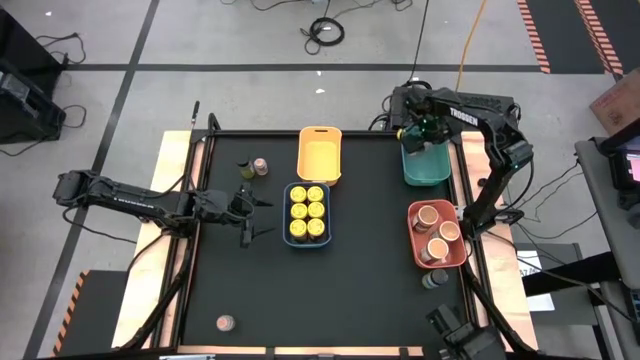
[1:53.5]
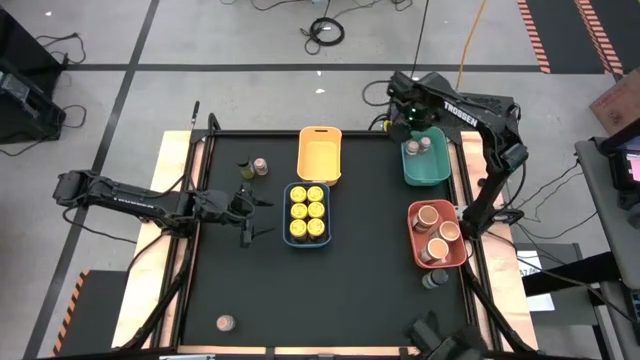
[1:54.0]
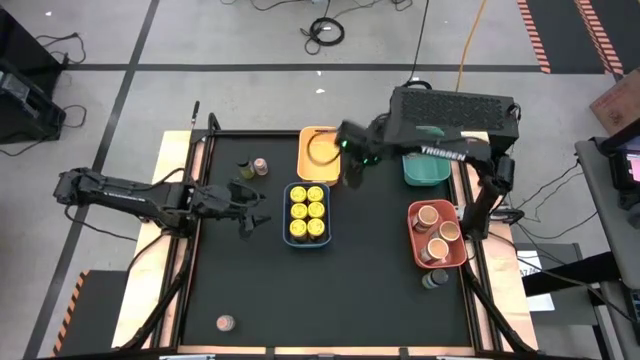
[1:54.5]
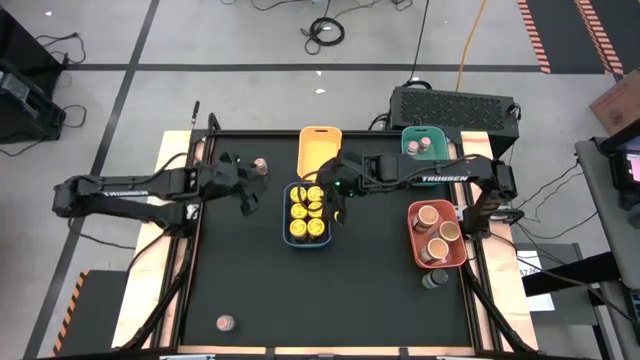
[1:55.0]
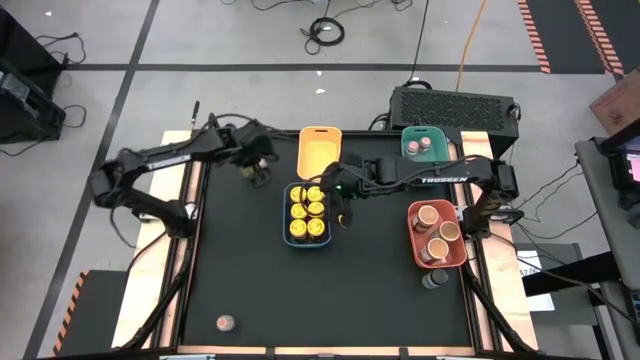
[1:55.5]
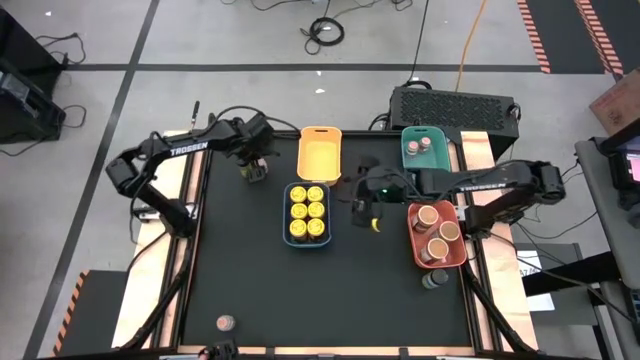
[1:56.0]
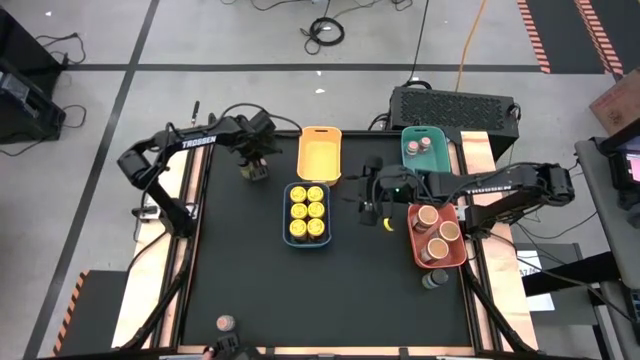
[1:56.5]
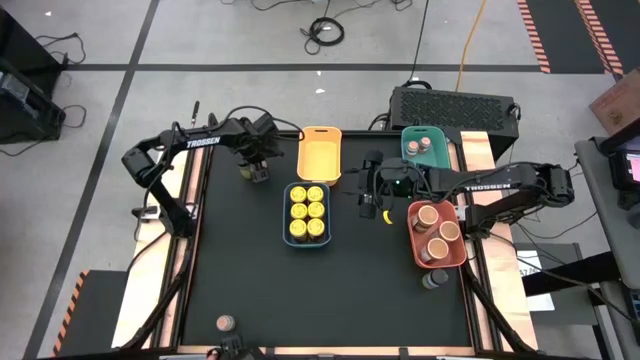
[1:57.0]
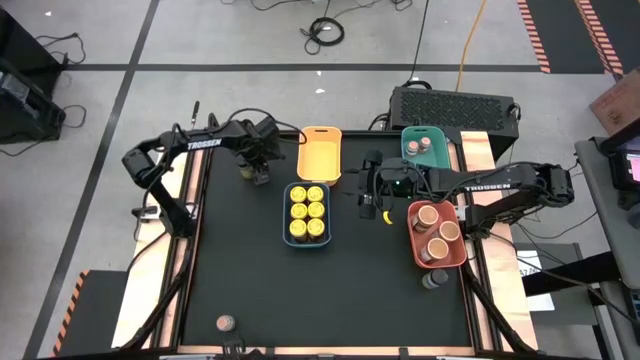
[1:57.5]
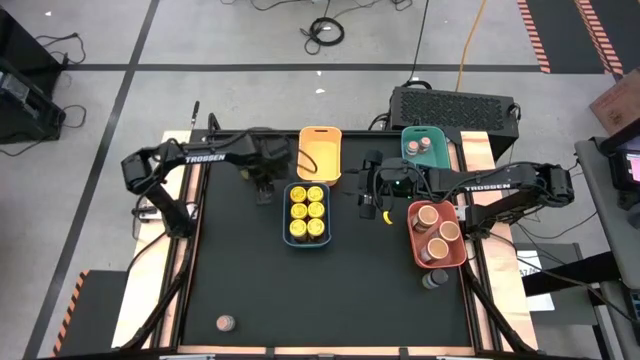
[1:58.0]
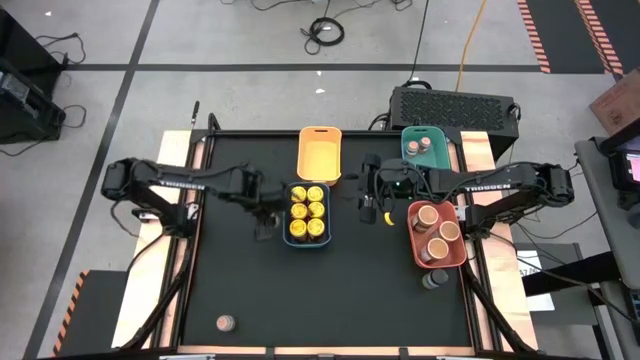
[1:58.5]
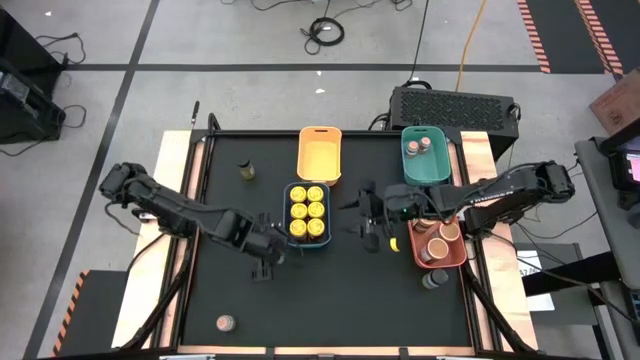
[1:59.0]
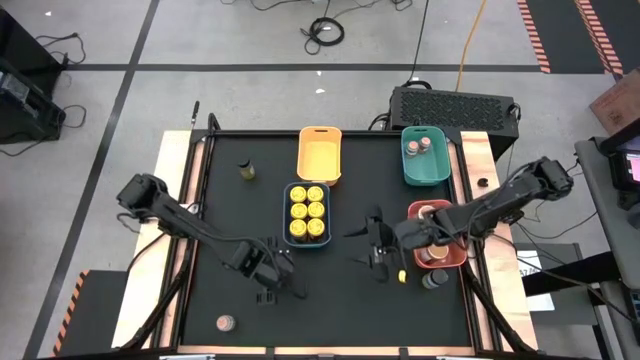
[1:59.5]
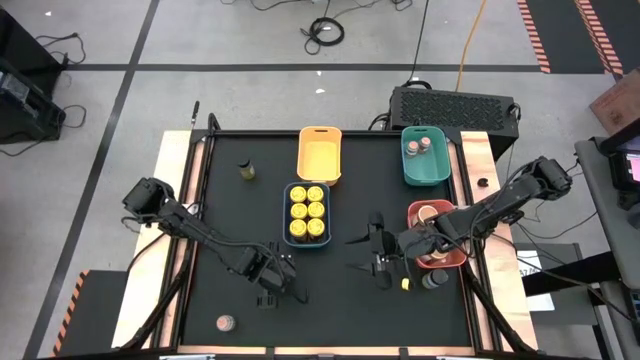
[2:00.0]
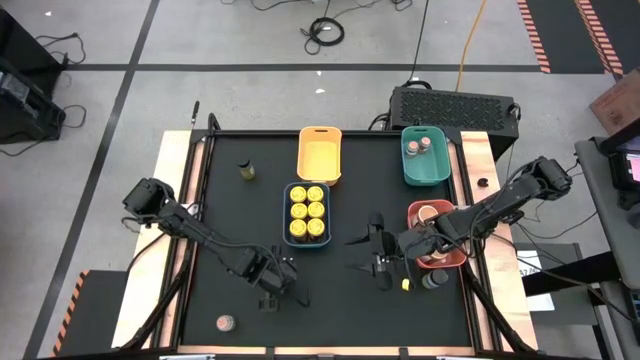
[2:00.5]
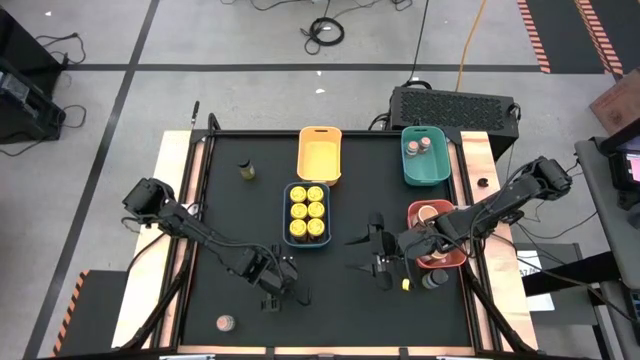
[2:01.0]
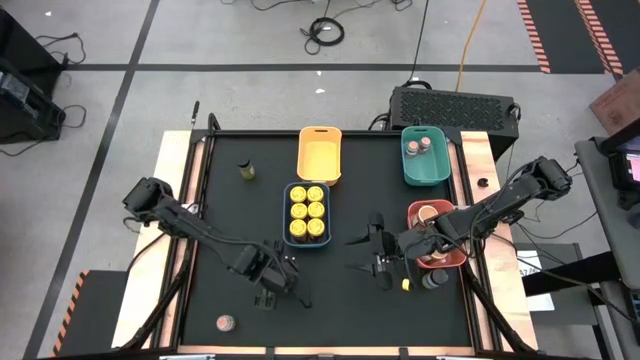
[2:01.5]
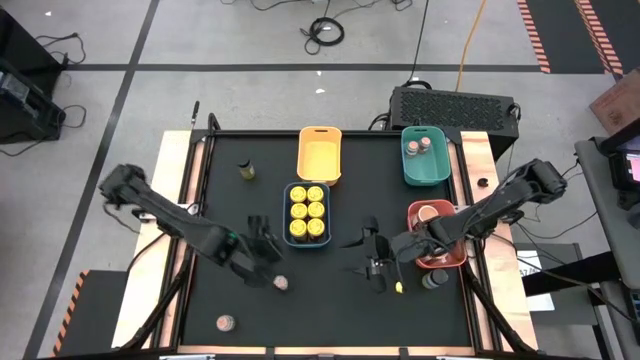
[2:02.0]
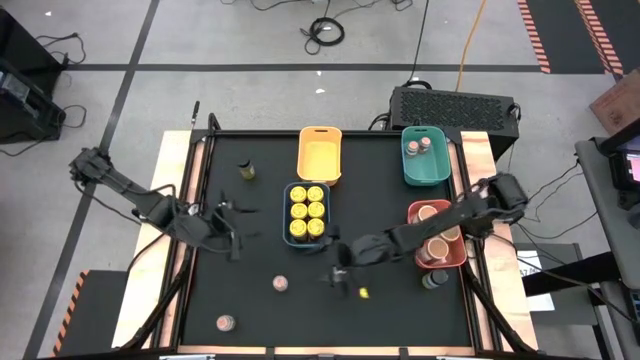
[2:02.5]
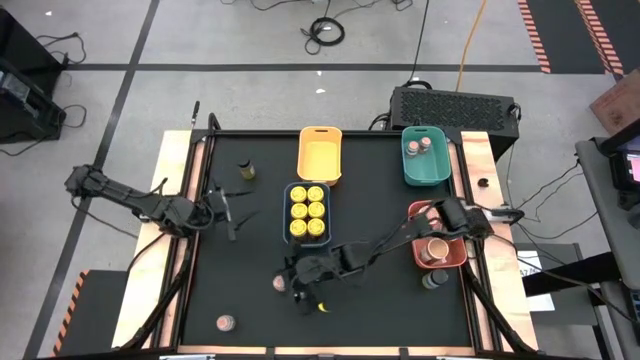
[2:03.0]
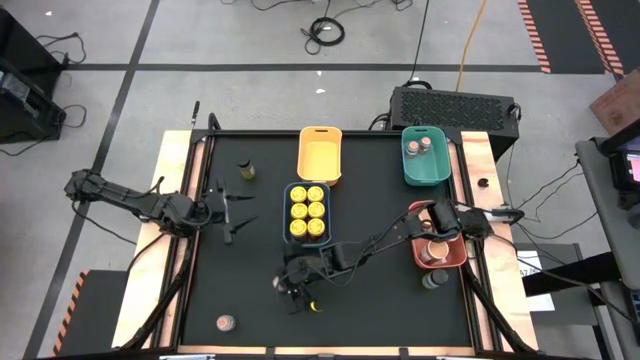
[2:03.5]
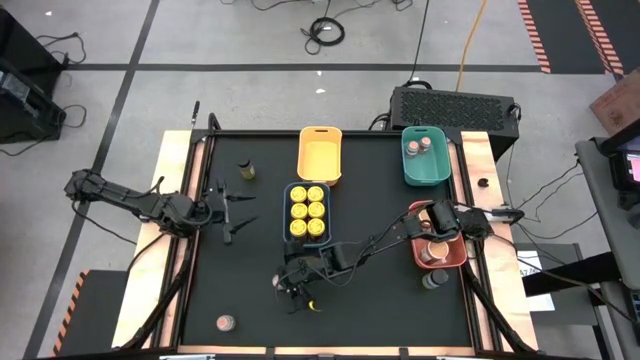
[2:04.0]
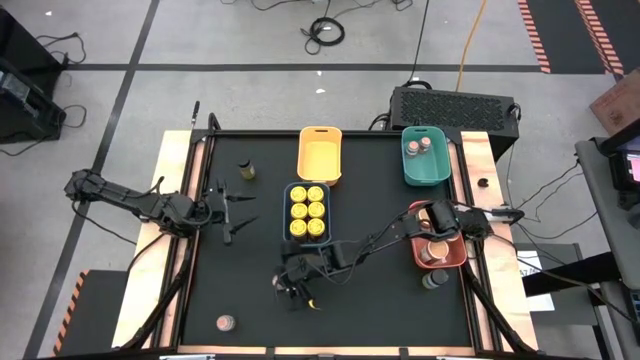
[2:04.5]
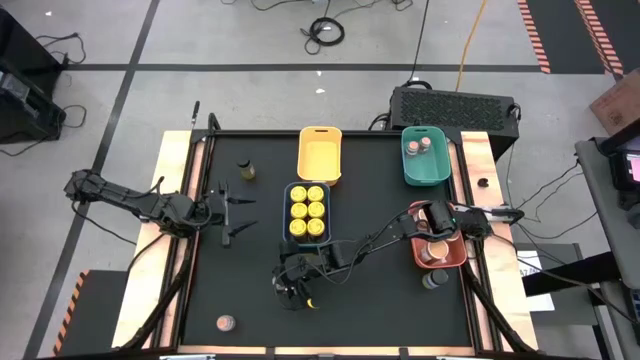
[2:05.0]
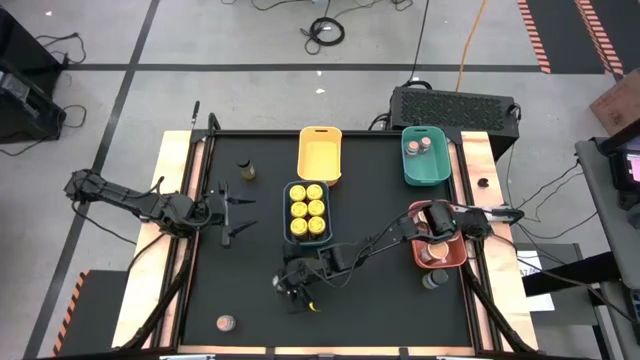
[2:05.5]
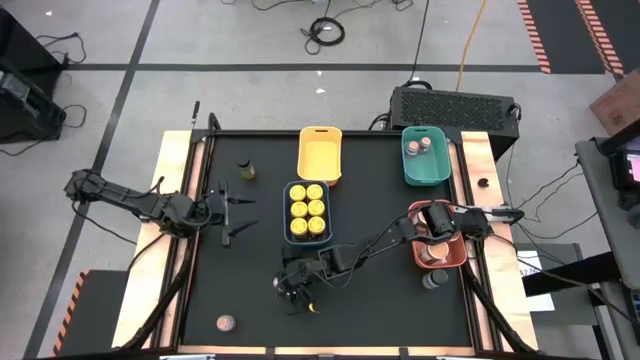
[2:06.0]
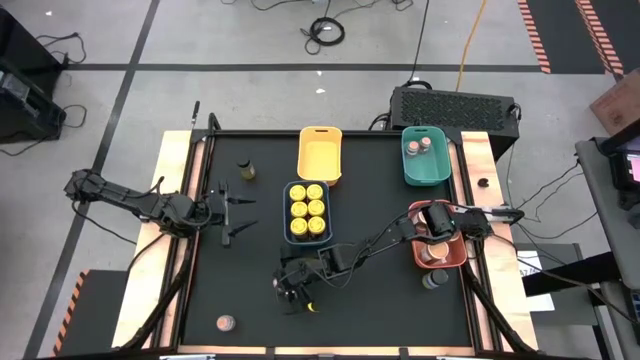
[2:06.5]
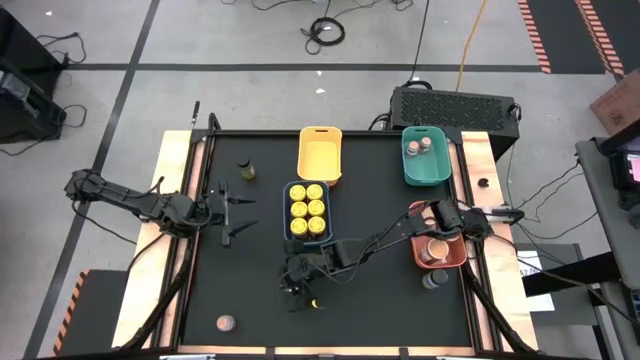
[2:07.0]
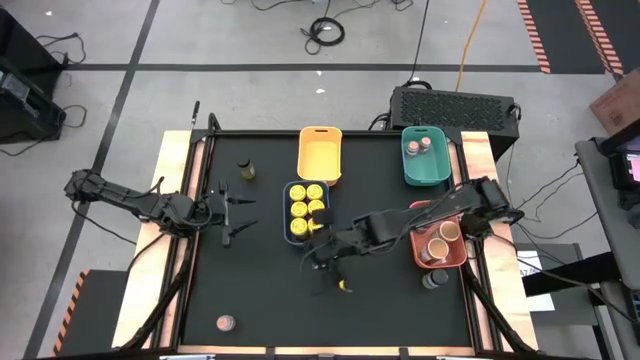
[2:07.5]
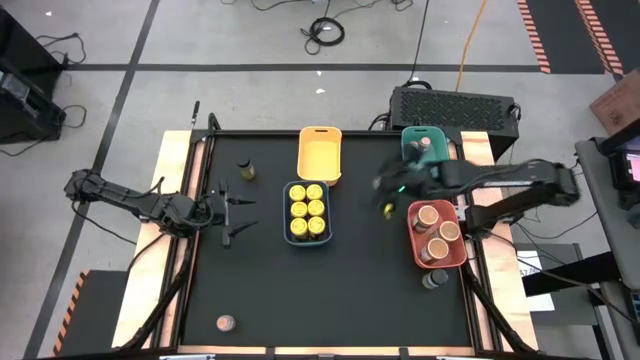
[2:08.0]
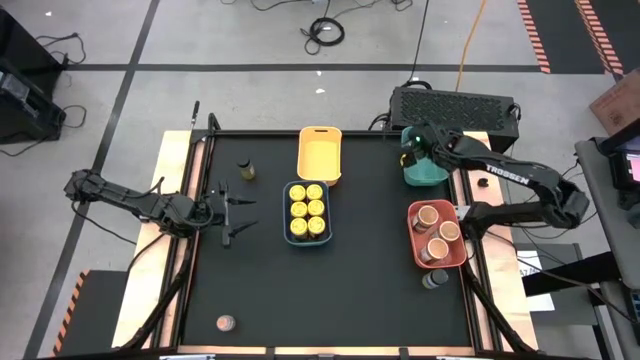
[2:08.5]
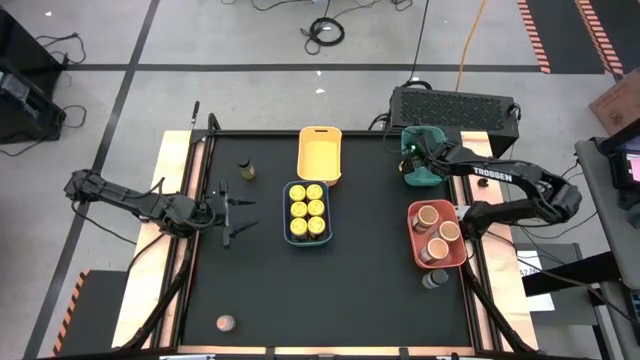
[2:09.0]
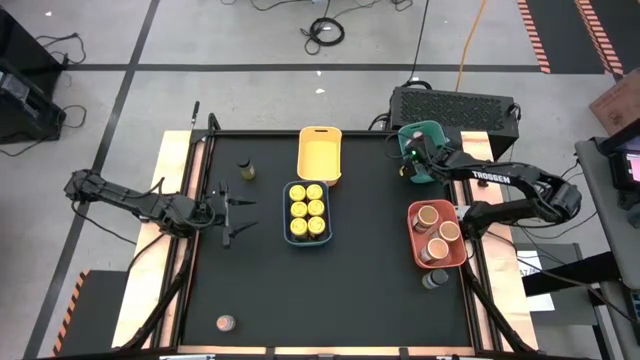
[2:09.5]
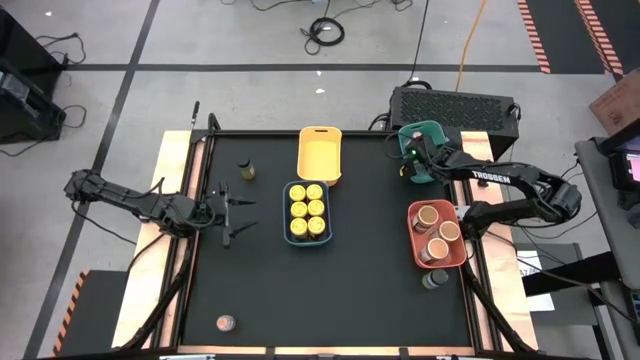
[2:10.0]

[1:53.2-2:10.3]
Task: Sort spices by type
Put the brown seasoning bottle into the green bin

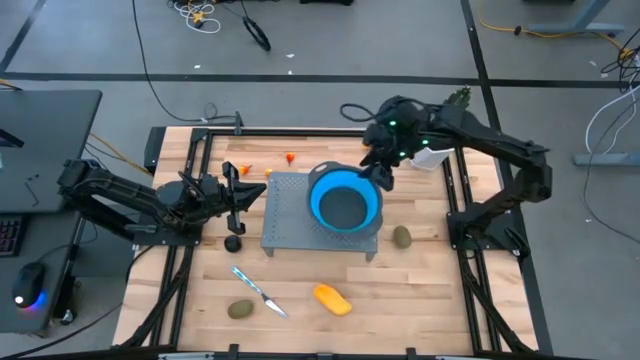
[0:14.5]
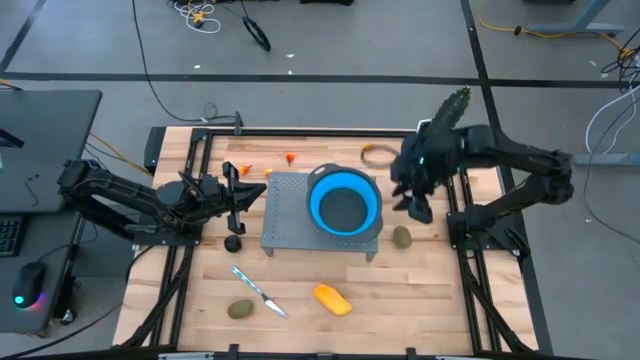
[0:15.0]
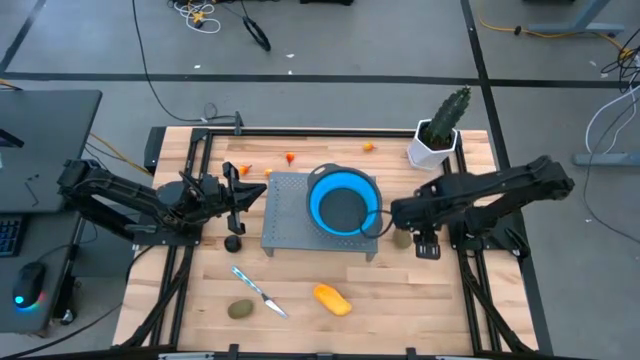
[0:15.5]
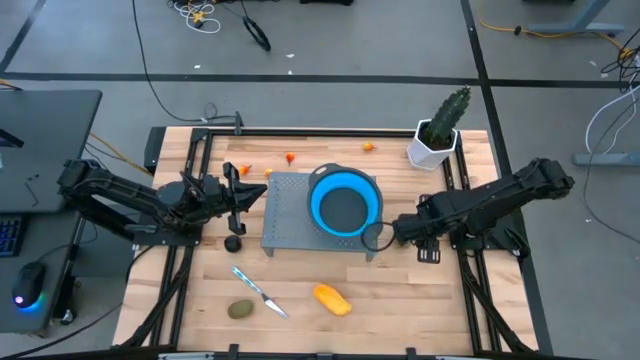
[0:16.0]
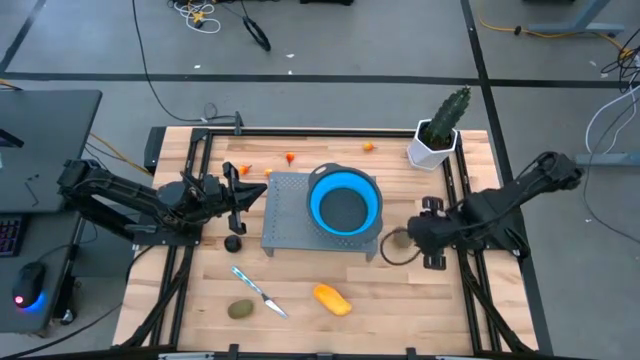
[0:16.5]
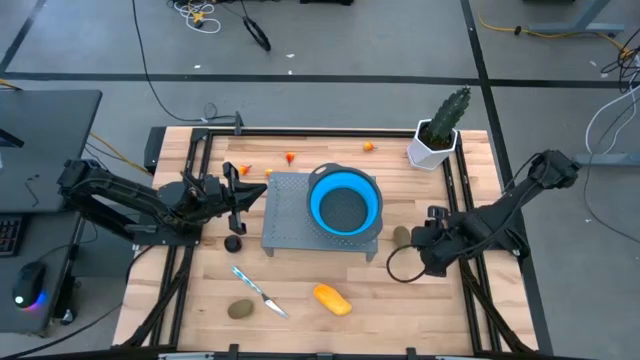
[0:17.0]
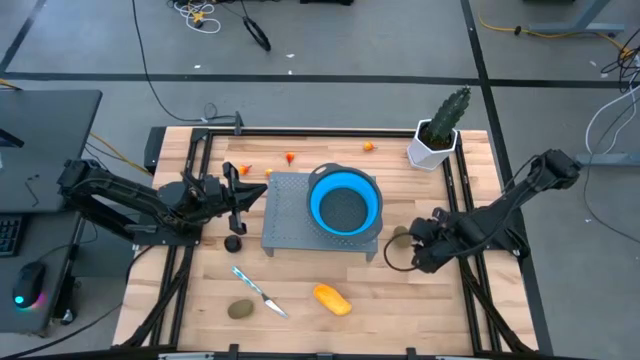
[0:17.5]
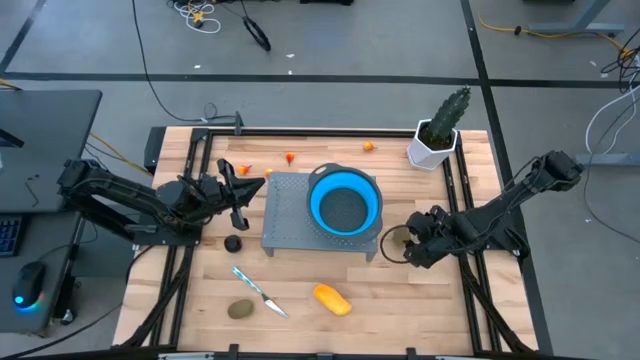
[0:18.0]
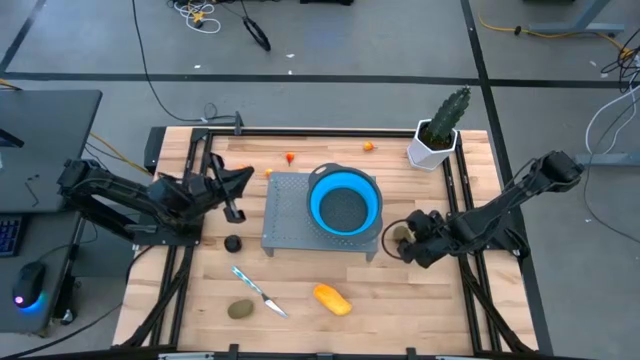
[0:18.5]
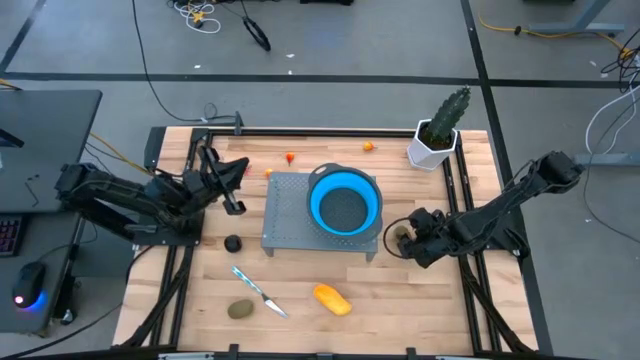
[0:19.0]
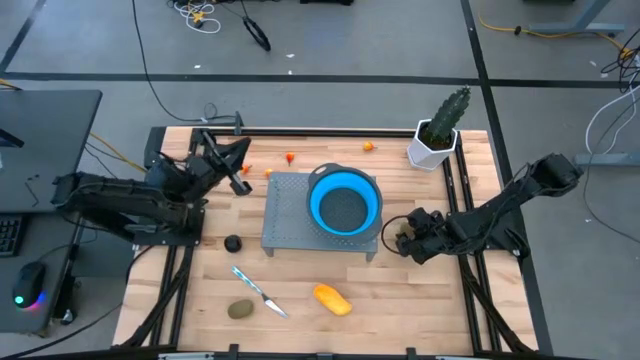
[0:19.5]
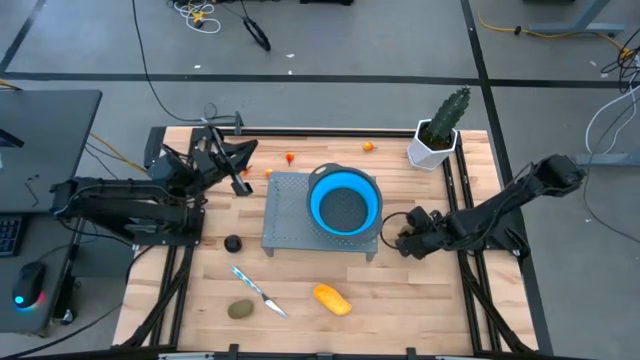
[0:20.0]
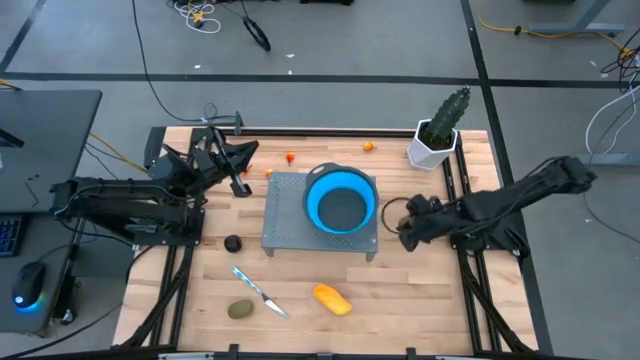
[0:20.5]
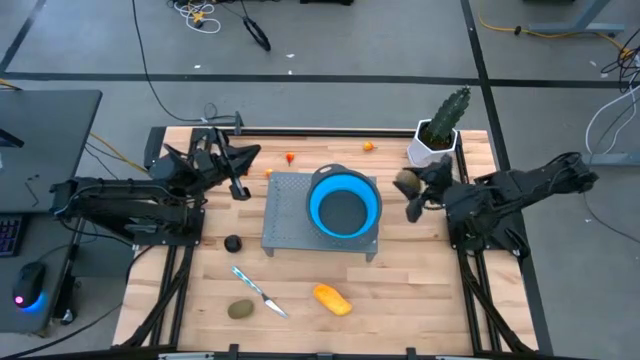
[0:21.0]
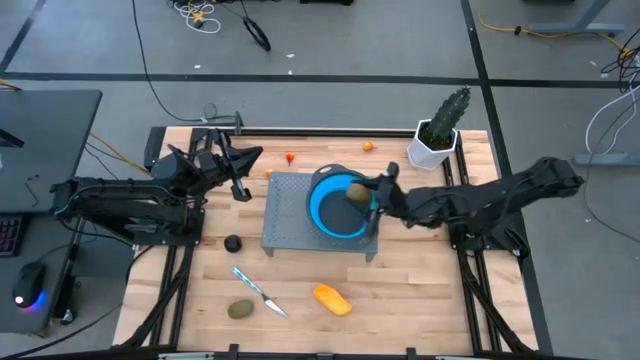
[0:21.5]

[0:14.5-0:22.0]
Task: Pick & Place Fruit
Put the brown kiwi into the blue strainer bowl on the shelf
